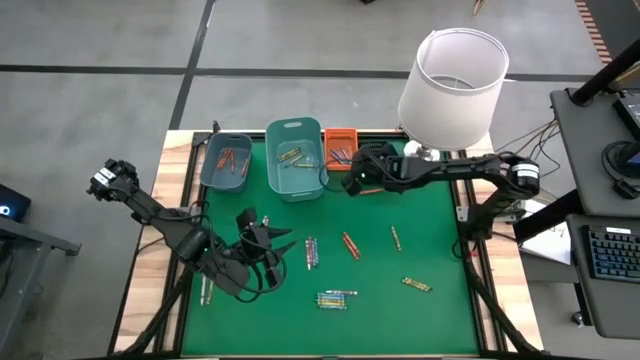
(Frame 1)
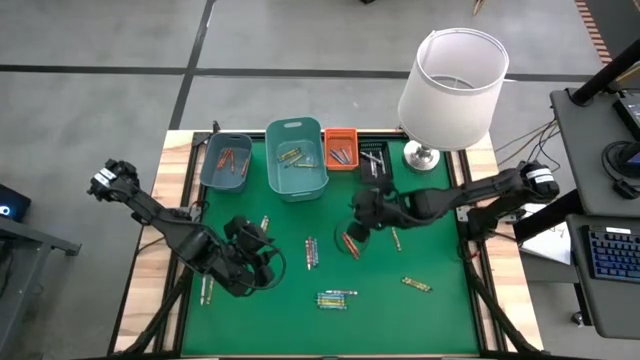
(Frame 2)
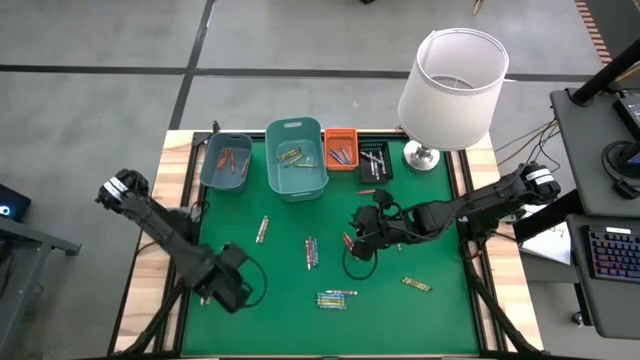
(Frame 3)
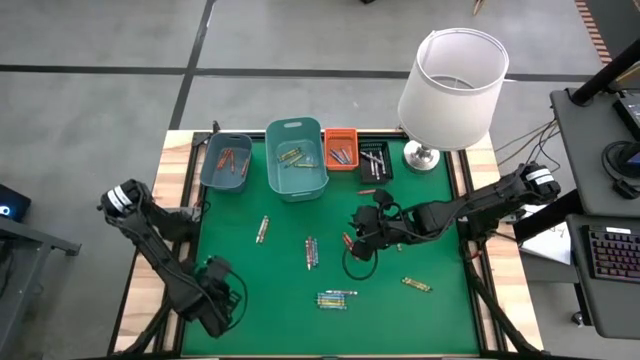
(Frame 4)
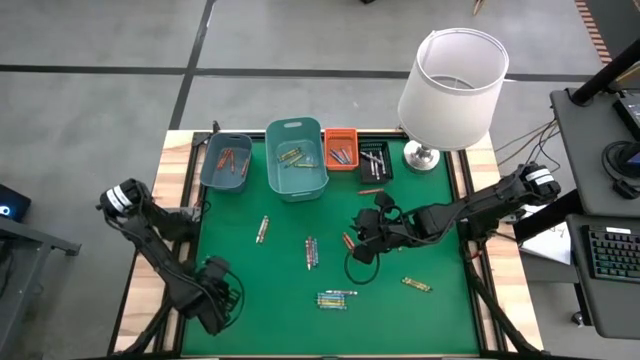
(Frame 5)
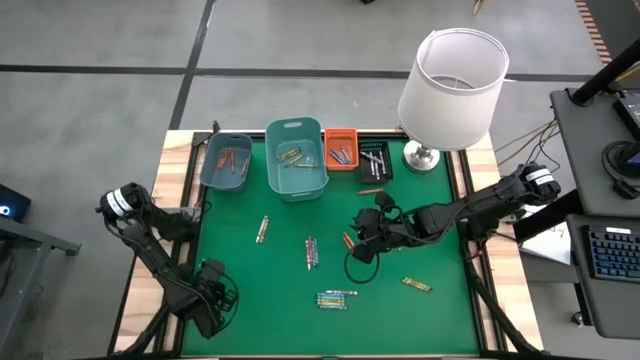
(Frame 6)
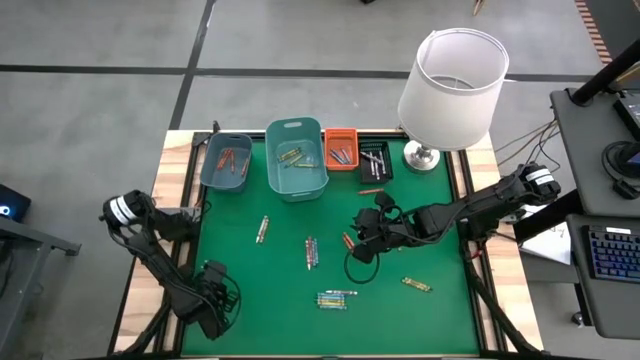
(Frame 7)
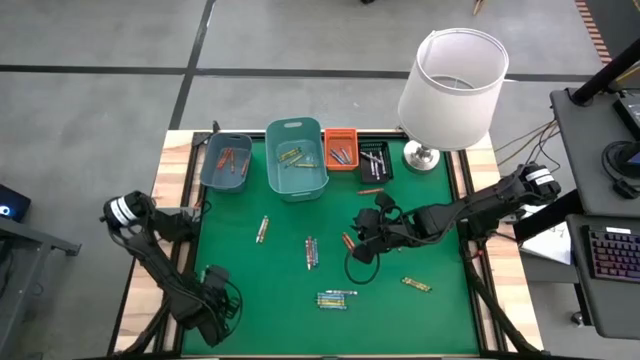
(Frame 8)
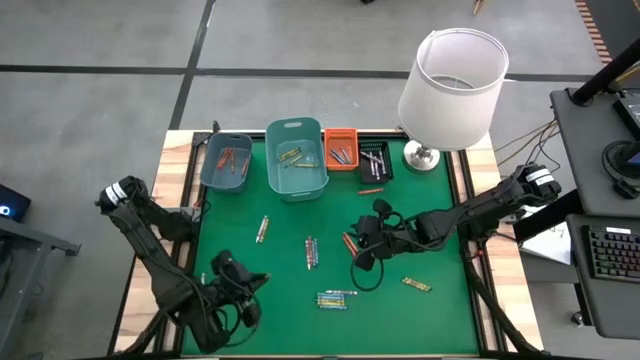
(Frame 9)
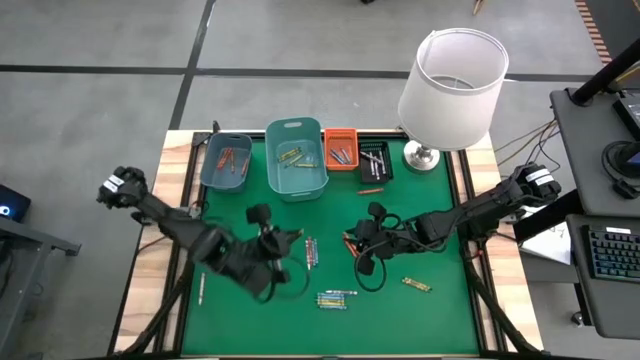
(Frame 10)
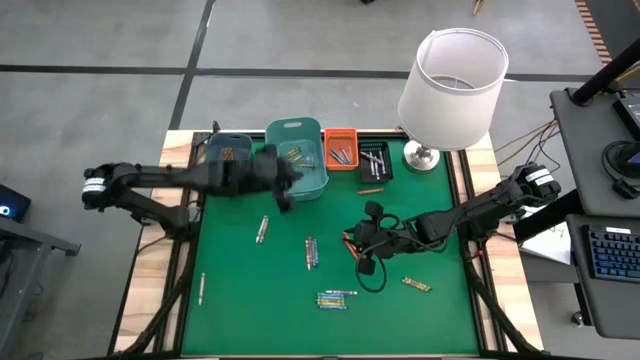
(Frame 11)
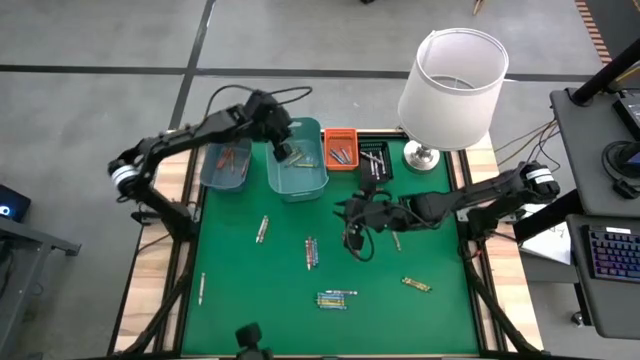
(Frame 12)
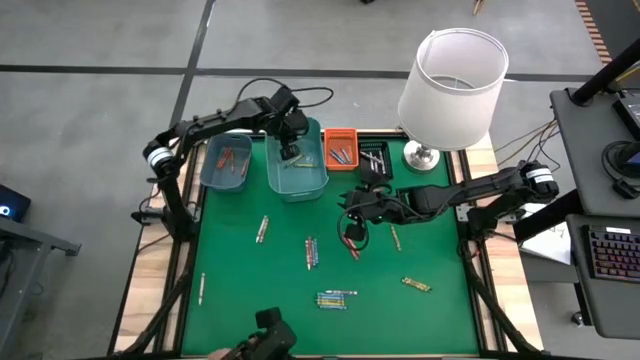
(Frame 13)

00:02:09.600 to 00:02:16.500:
Task: Sort crayons
Put the green crayon into the green bin

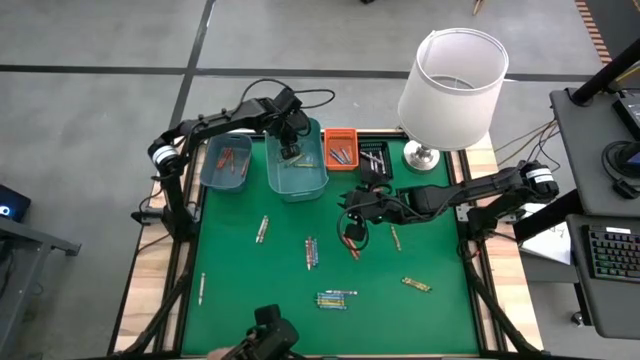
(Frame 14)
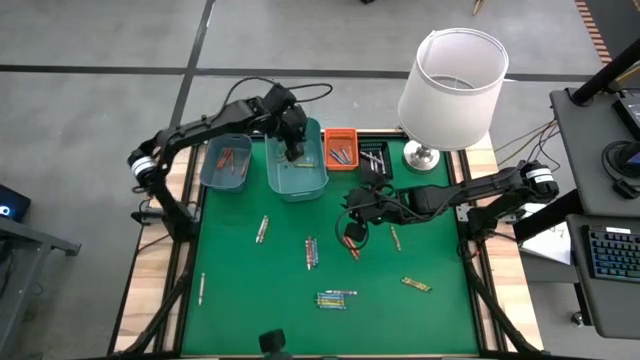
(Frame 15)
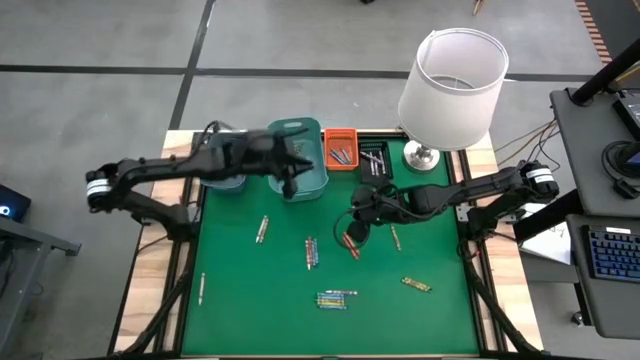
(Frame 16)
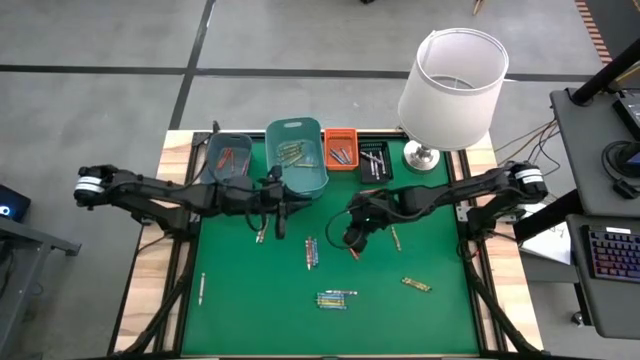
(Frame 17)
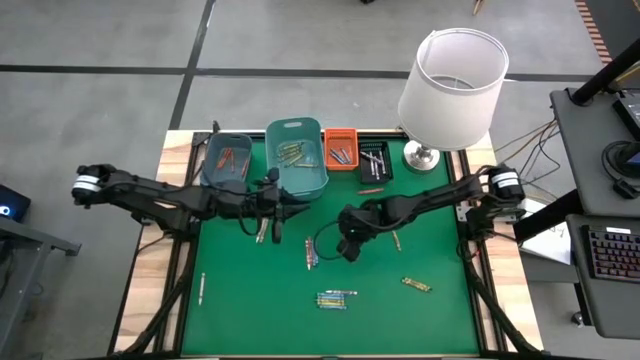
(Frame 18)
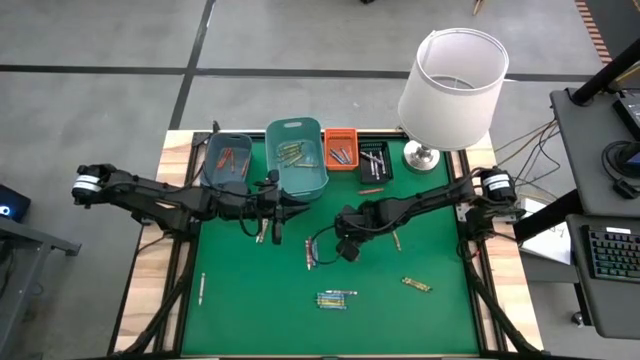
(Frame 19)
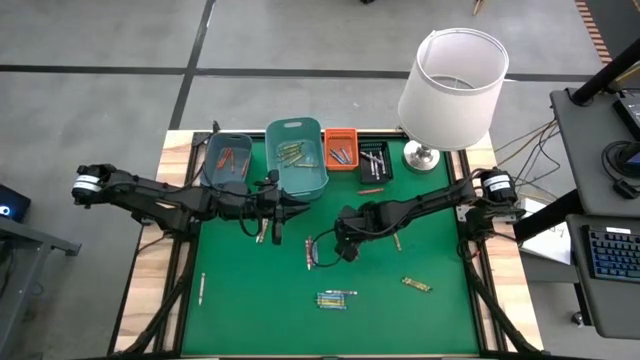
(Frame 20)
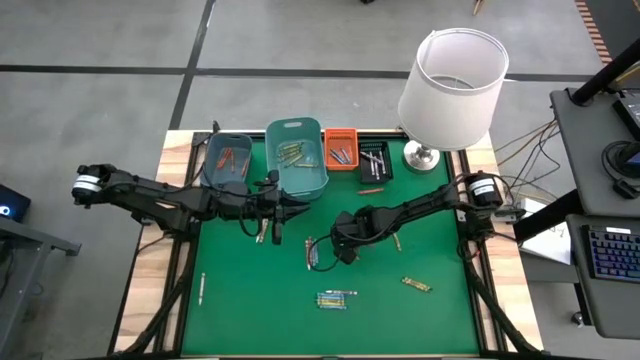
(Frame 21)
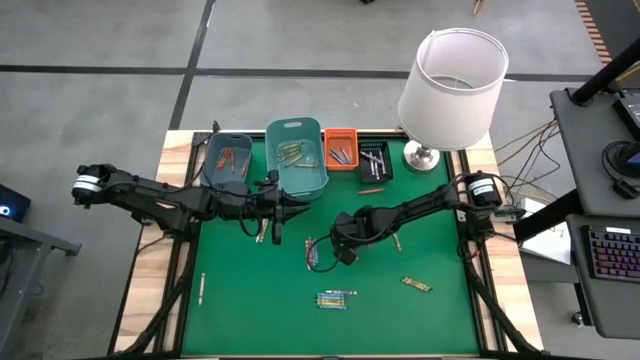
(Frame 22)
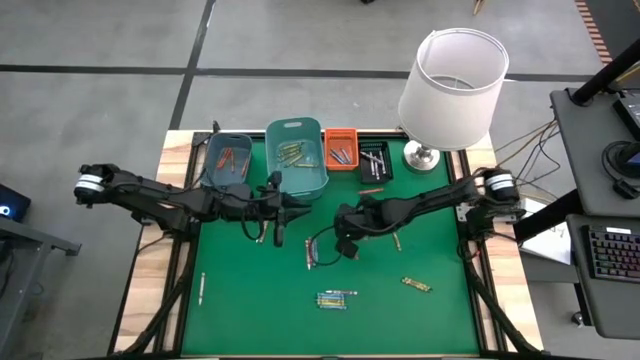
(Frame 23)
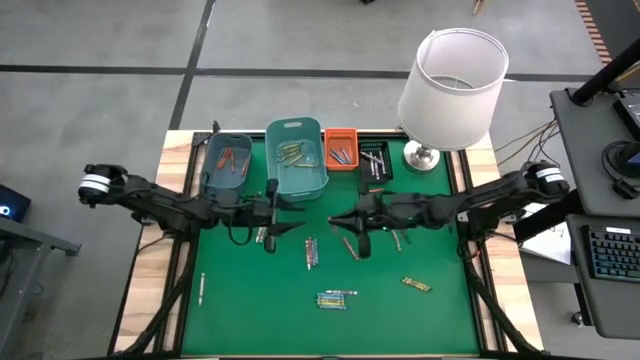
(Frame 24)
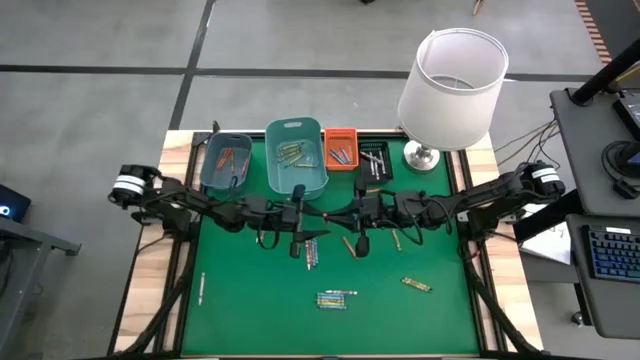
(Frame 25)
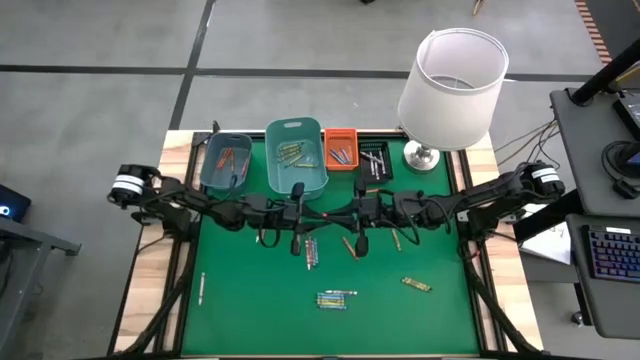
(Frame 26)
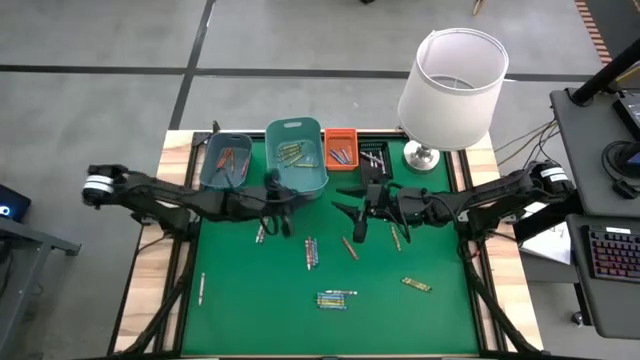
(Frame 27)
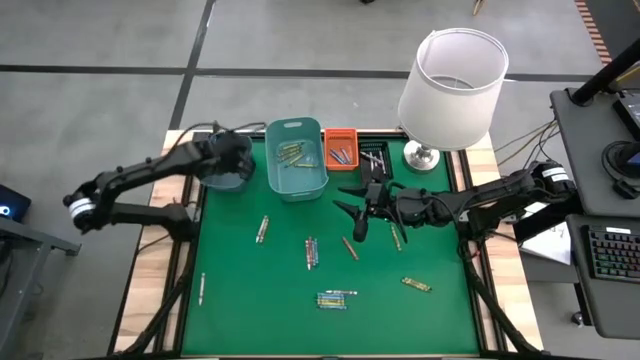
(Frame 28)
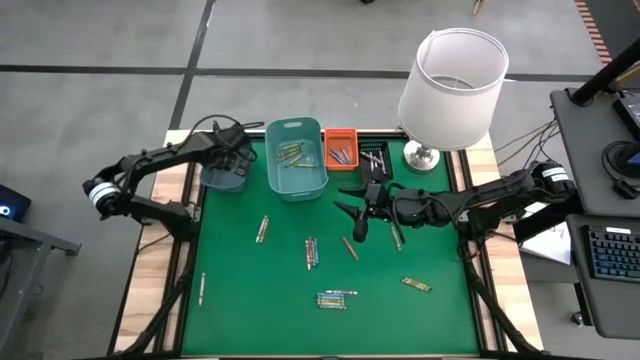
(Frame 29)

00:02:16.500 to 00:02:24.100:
Put the orange crayon into the blue bin

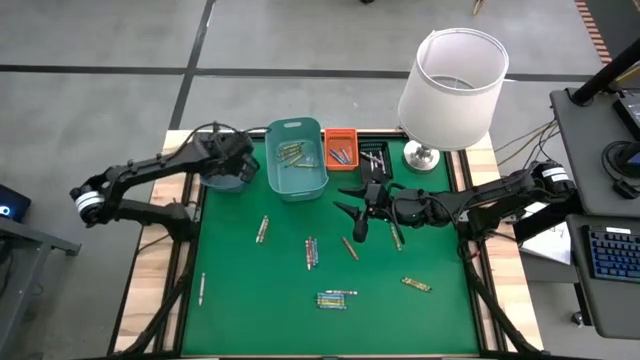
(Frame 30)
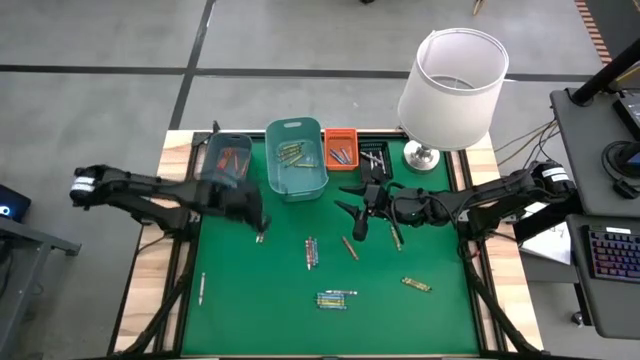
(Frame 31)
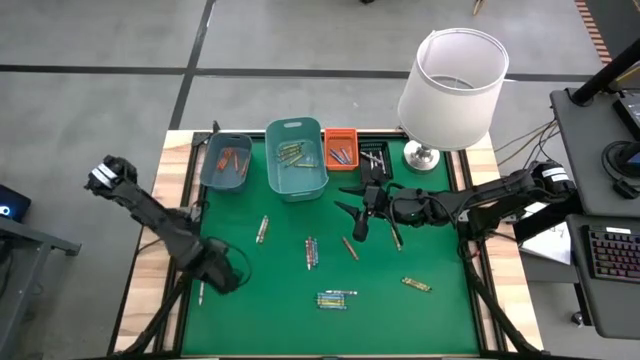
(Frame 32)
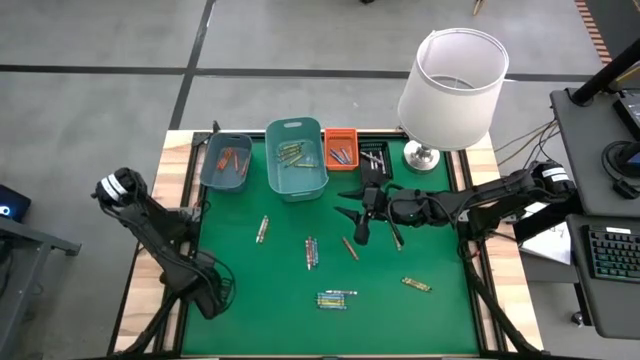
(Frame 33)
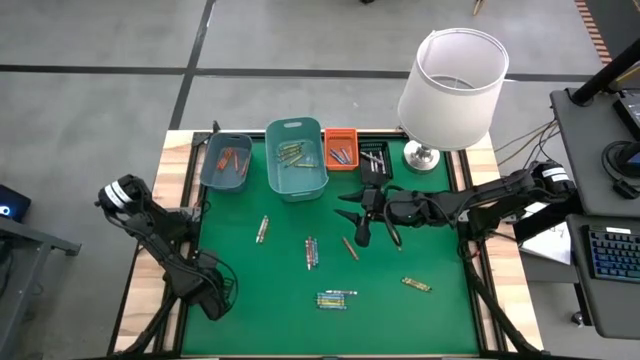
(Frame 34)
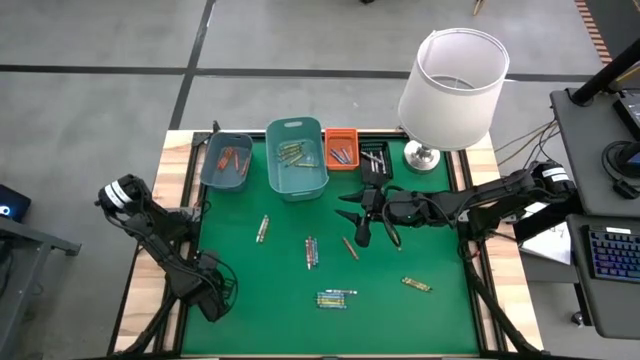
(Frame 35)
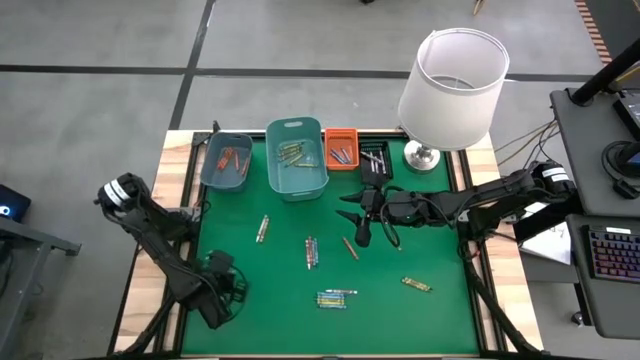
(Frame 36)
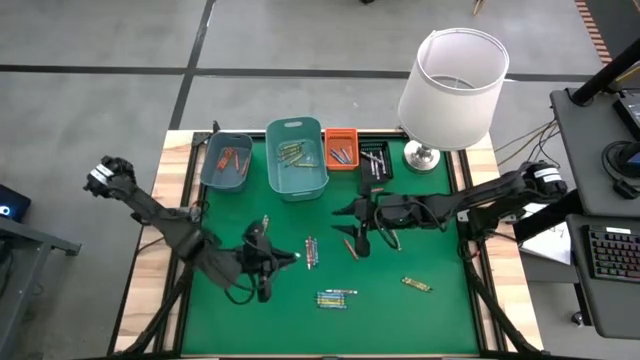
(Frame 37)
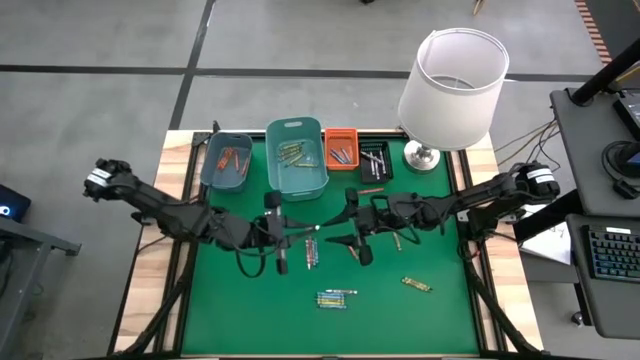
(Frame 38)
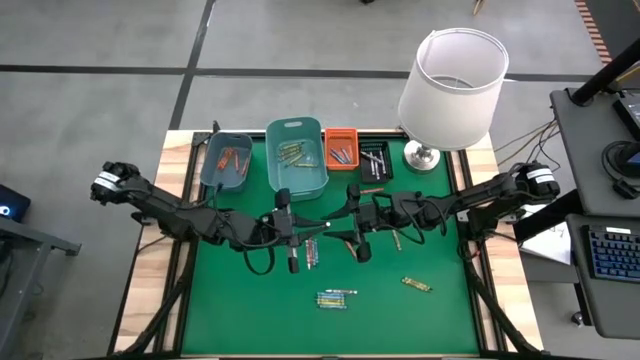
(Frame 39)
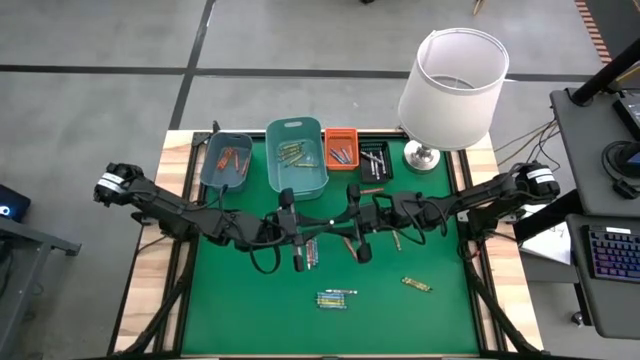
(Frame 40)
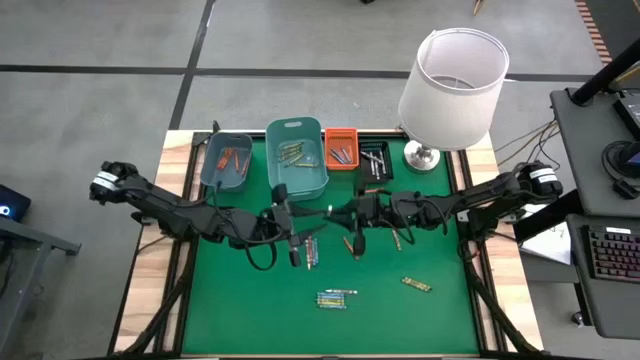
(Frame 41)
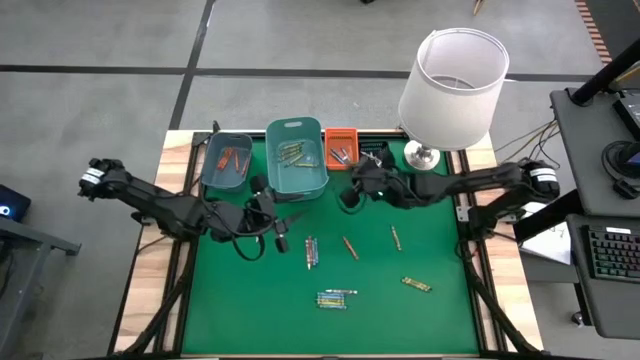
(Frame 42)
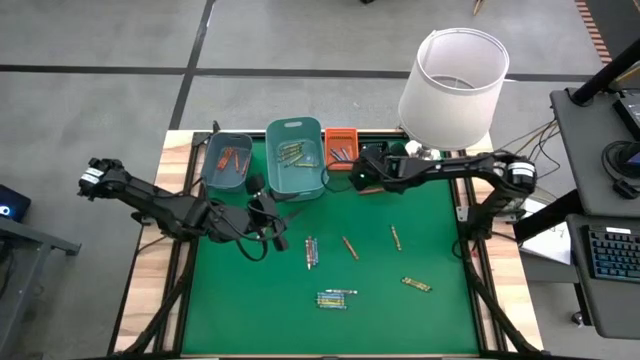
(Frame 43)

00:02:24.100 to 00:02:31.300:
Put the white crayon into the black bin
